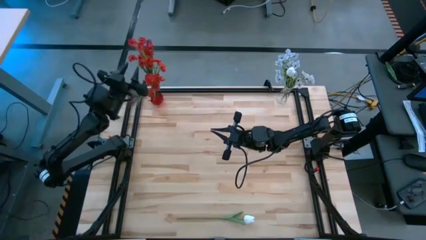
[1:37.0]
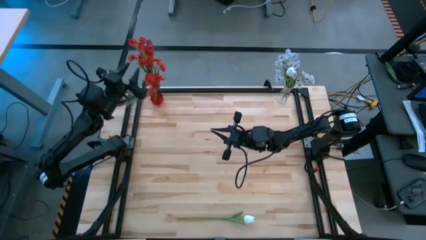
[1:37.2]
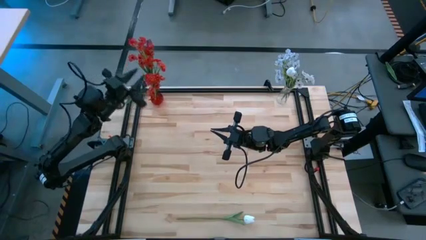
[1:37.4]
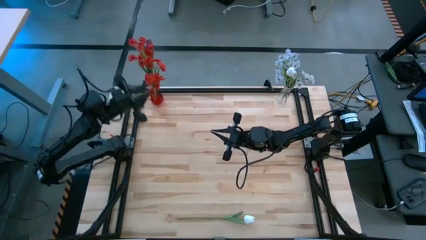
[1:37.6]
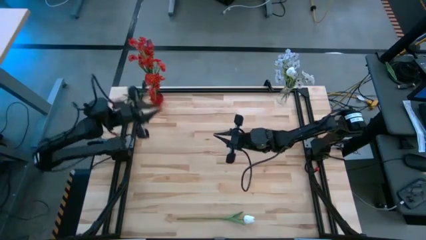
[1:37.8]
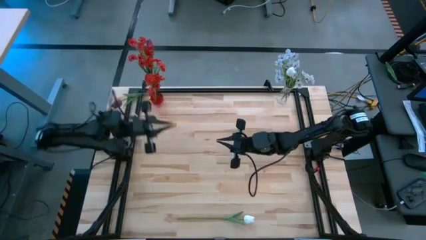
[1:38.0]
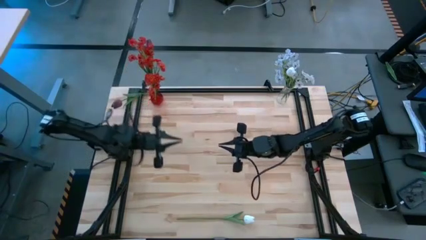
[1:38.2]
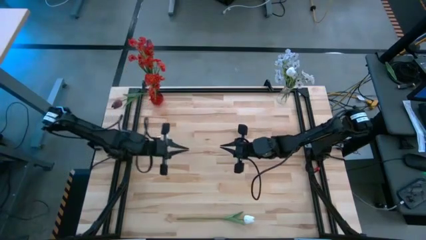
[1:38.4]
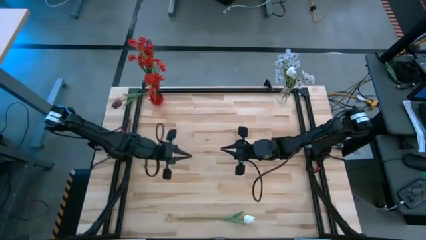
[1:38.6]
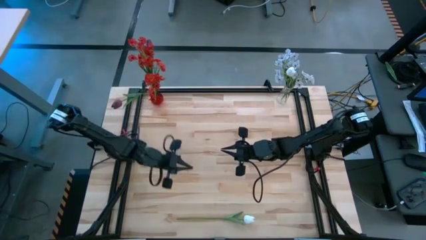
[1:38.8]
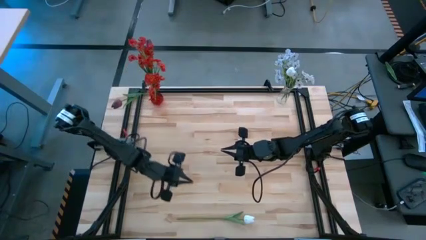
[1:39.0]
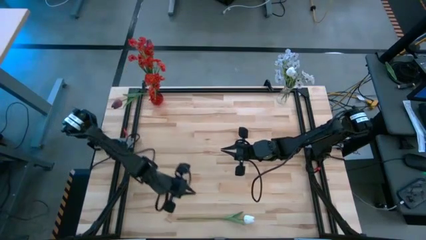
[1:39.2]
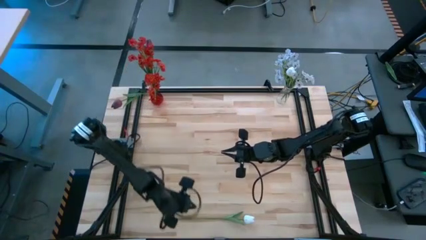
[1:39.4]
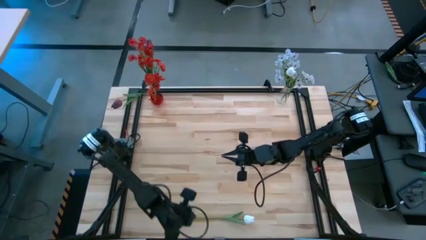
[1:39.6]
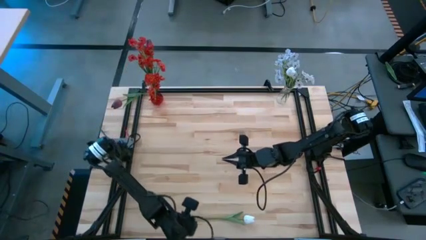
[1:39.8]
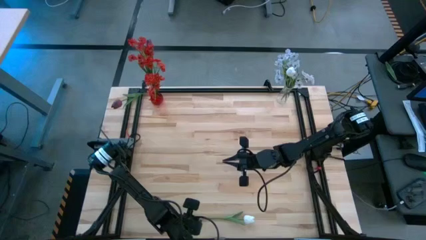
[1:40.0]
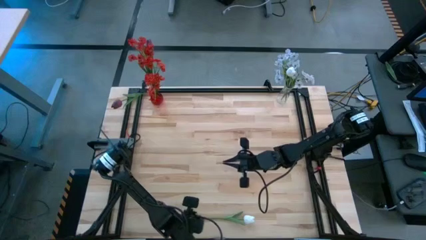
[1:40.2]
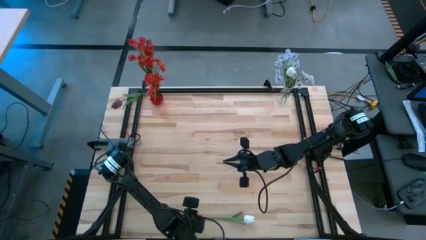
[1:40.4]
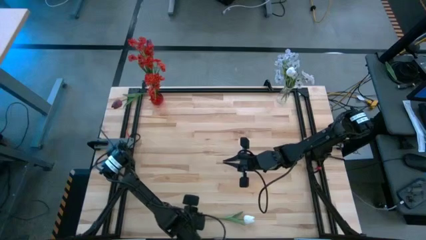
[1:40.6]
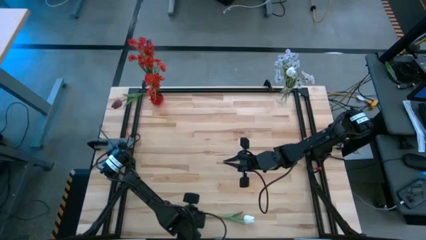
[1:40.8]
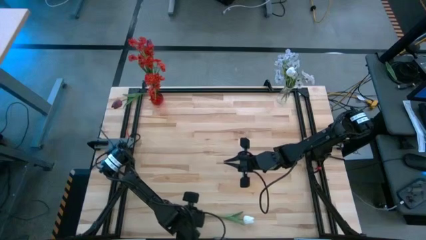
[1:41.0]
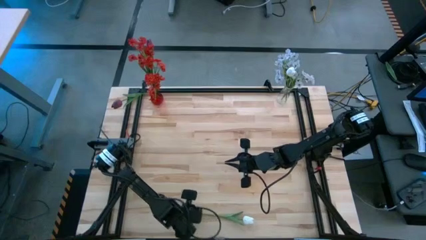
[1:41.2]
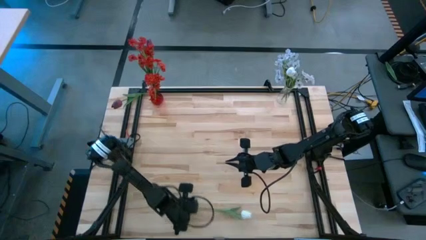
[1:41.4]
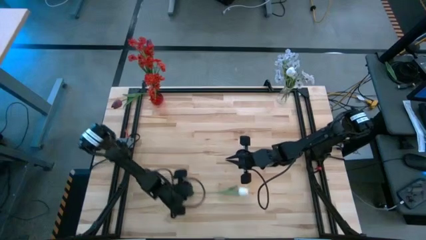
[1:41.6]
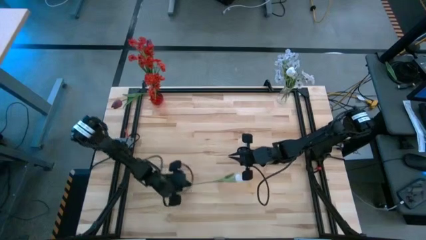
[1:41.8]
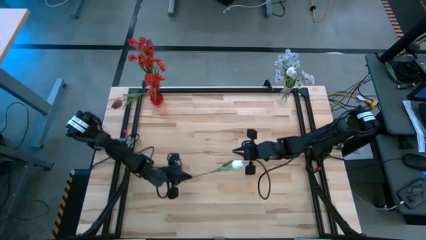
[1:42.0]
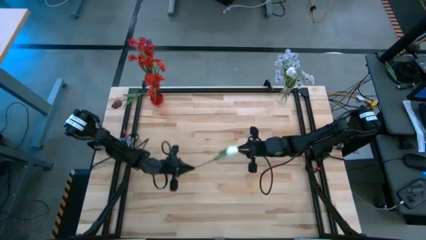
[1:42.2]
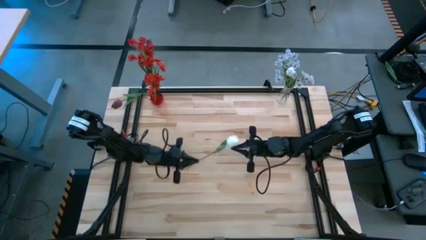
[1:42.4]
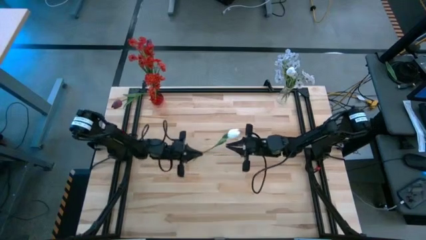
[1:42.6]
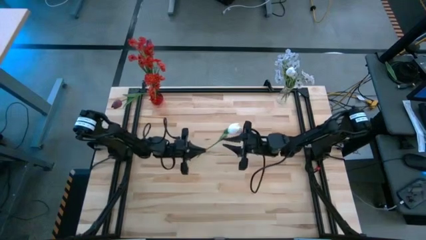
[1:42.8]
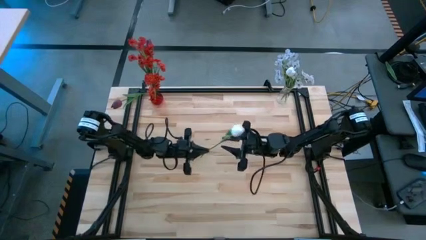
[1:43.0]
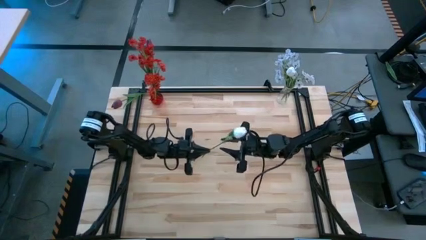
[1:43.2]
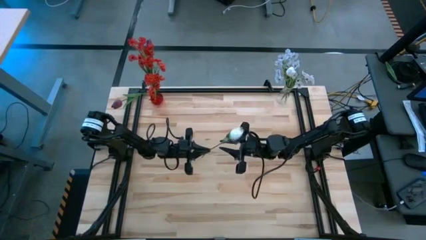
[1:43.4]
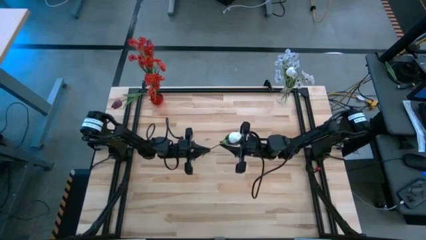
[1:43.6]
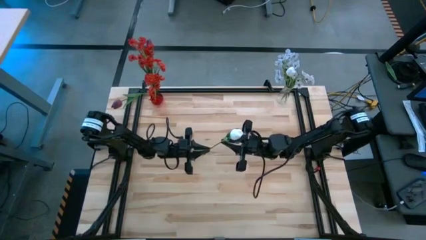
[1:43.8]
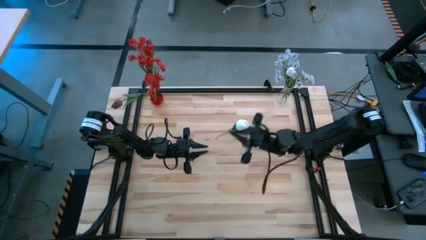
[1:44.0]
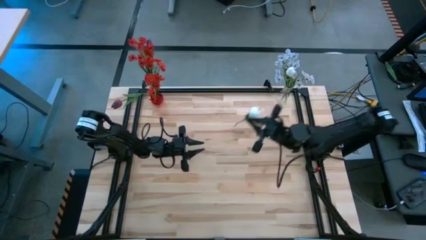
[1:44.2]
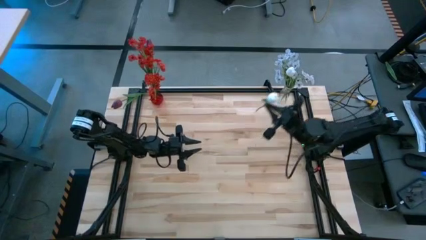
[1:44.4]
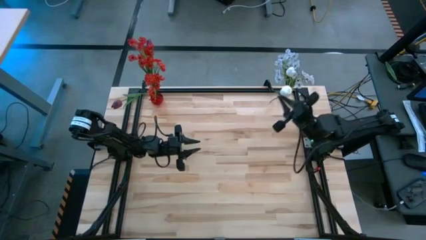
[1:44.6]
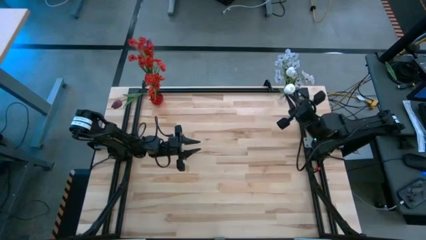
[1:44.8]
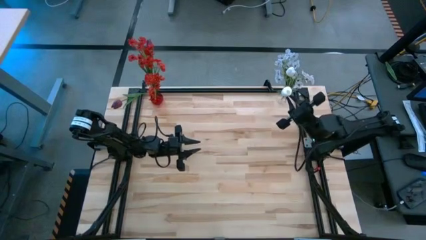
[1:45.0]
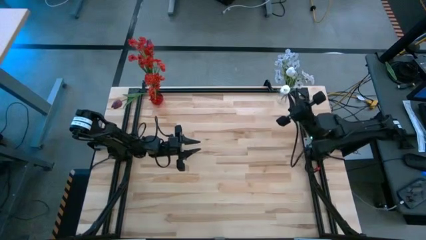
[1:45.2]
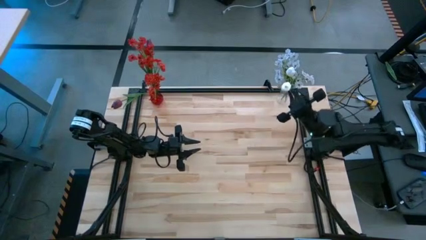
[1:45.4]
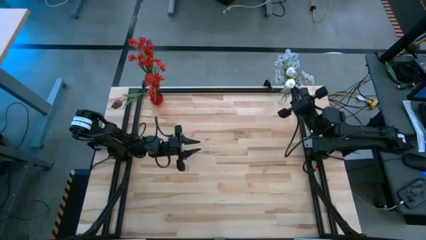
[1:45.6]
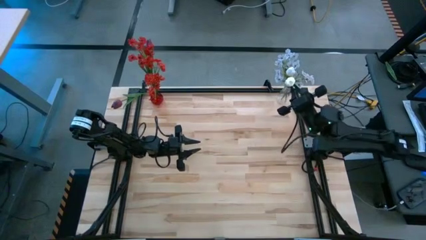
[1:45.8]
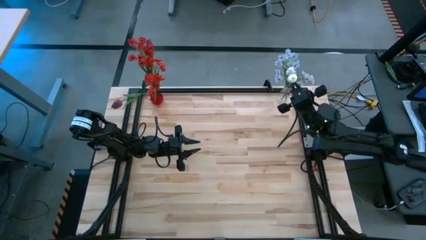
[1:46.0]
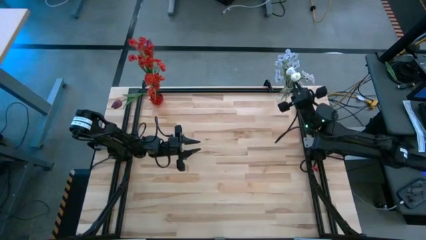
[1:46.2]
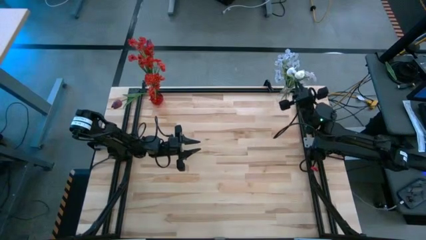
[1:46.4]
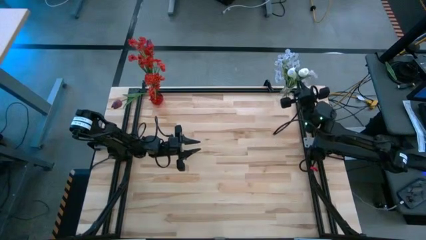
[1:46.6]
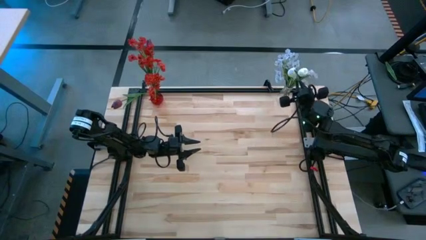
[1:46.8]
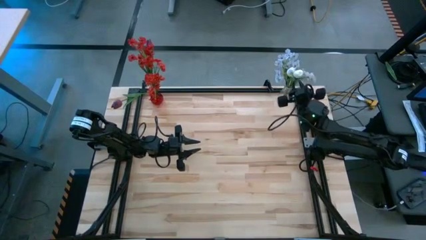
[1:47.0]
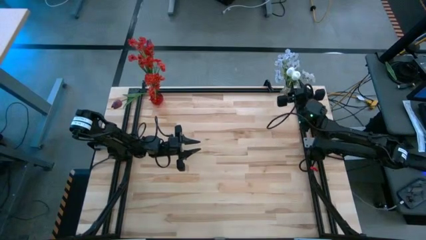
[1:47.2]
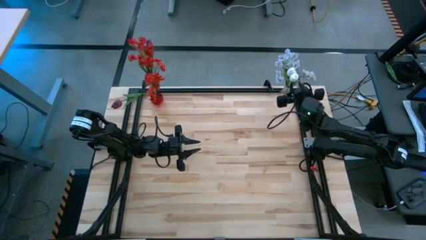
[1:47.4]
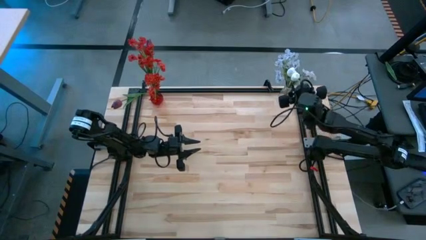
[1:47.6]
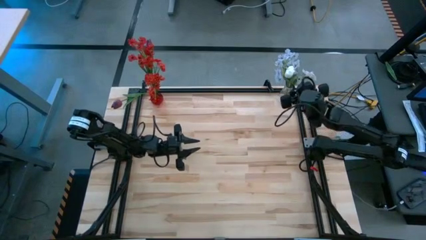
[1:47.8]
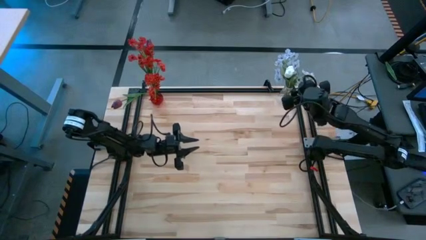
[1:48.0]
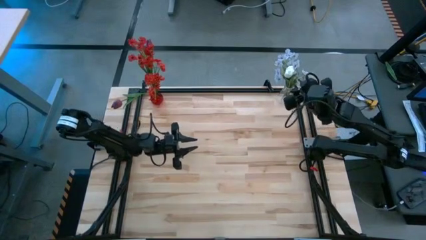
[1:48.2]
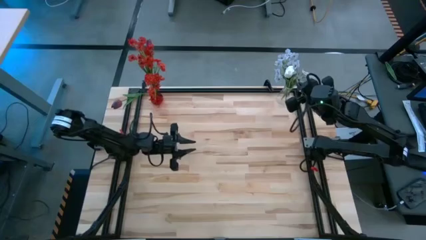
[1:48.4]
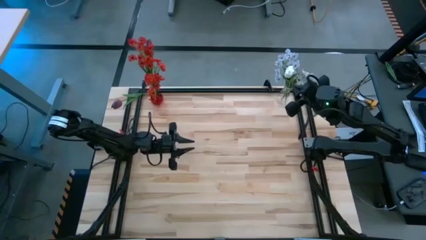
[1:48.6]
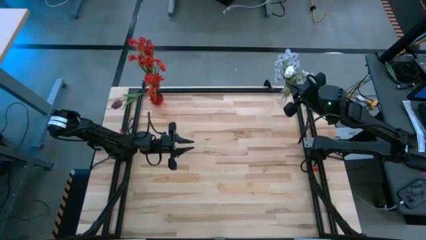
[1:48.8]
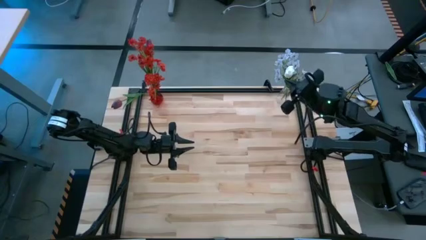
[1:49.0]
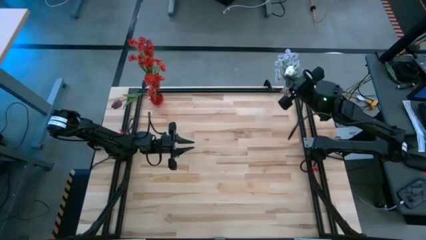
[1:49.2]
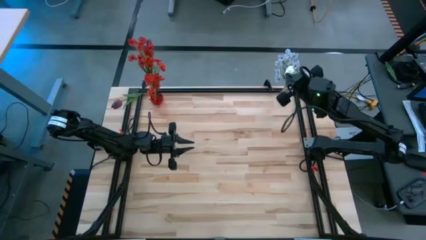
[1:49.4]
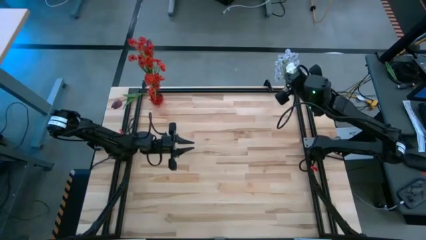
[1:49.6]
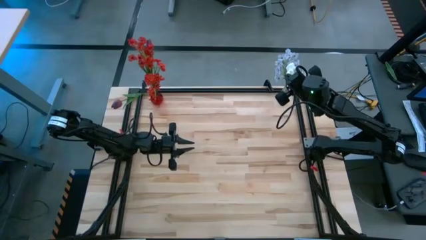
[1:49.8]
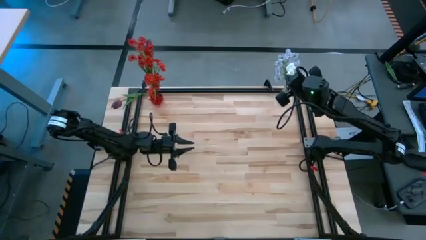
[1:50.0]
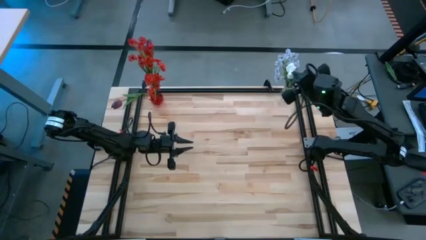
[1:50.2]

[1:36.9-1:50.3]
Task: Sort flowers into vase by color
Put the white tulip into the transparent flower vase

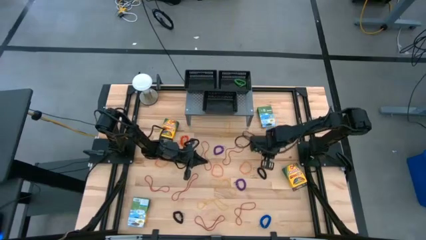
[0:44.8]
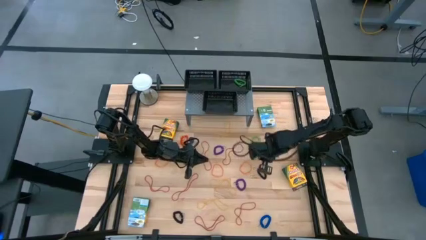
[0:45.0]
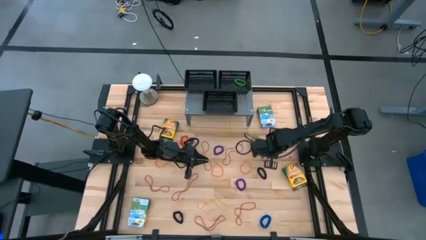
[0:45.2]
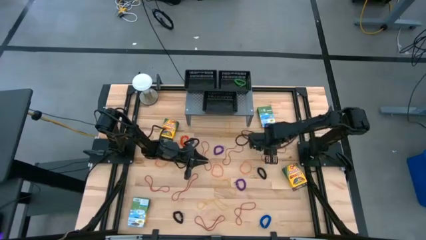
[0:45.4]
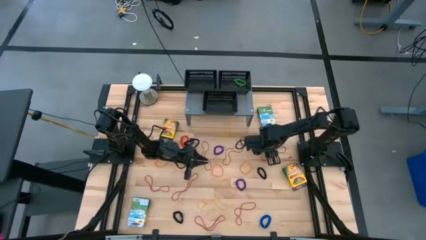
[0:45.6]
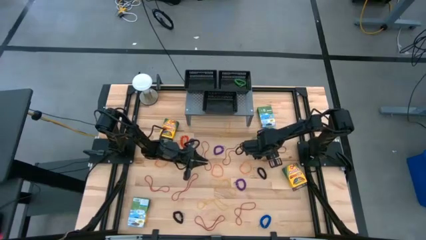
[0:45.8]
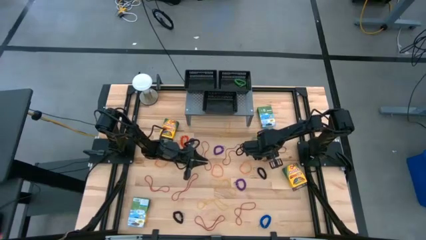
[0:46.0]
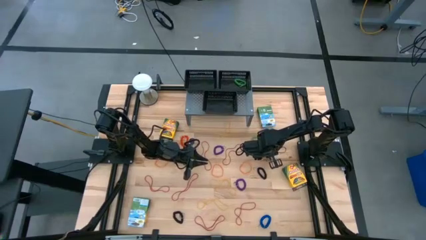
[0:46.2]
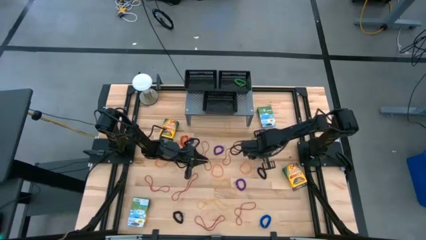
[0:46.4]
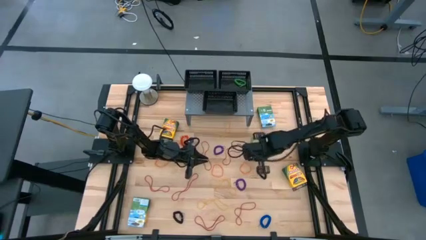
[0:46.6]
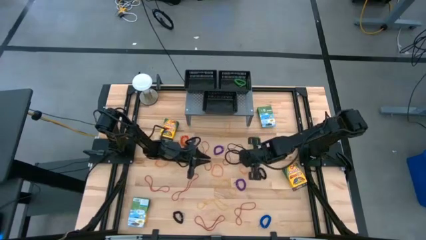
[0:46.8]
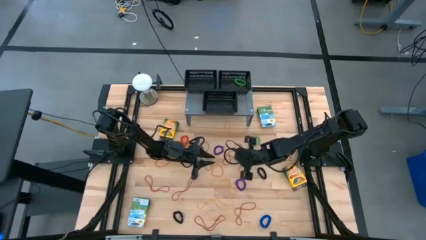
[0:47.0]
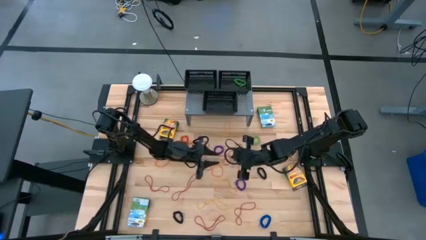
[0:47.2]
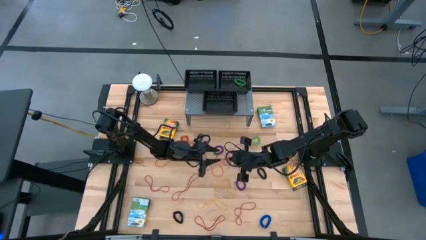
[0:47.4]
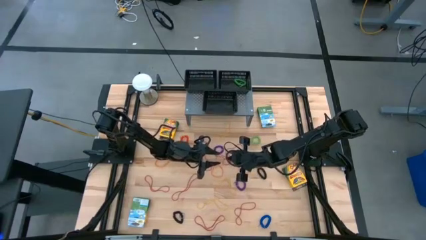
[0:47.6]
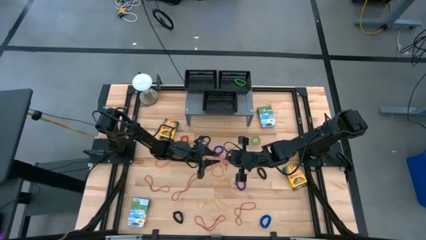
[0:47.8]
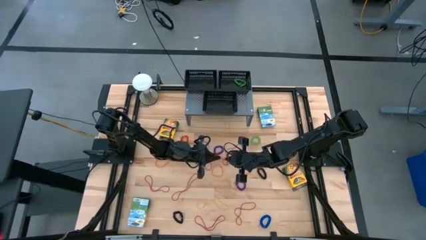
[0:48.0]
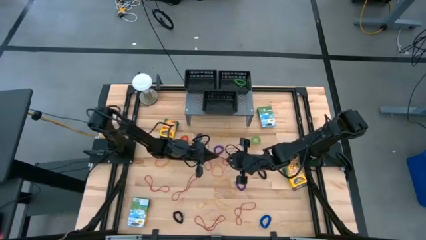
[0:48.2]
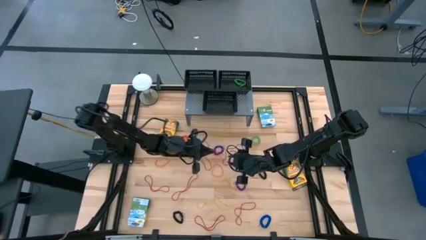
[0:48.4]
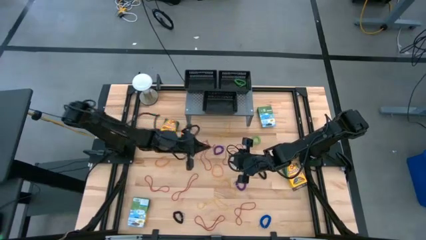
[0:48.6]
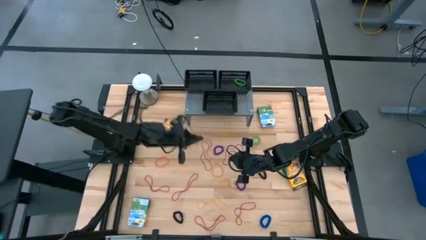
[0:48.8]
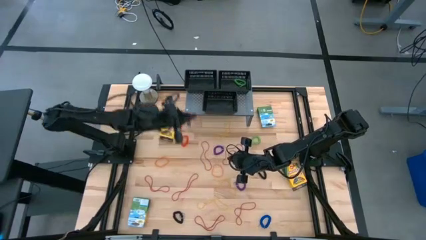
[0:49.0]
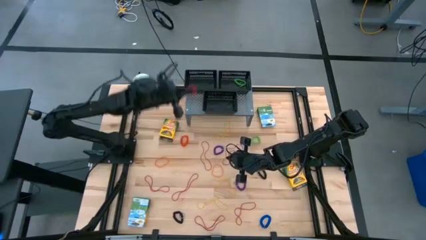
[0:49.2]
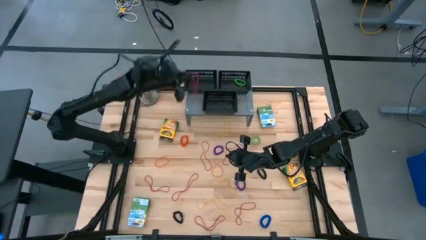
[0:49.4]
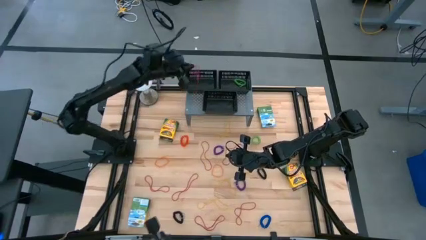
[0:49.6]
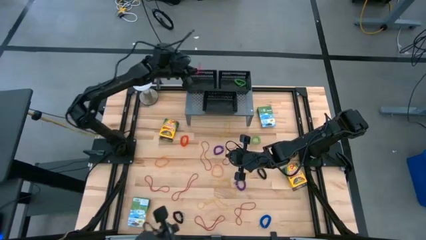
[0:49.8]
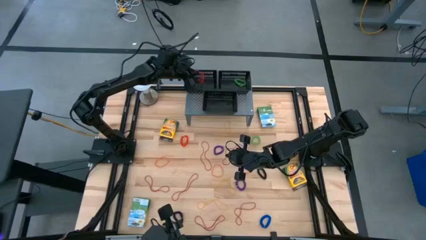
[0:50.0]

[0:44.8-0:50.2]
Task: Pick & Place Office Desk Supplies
Put the red rubber band into the top left black basket on the shelf
